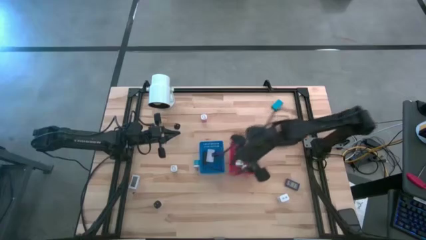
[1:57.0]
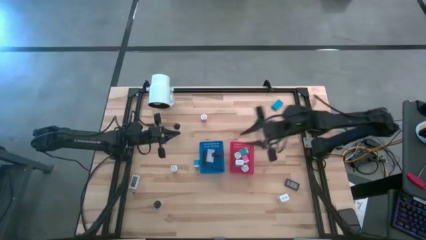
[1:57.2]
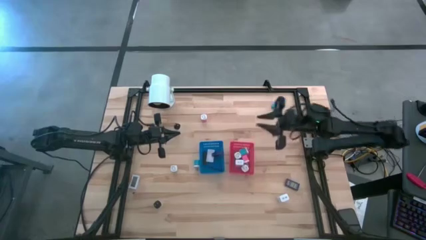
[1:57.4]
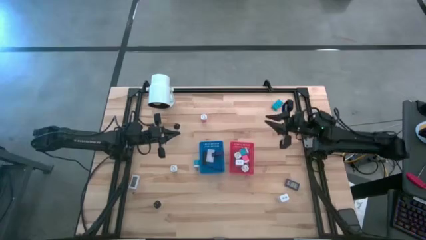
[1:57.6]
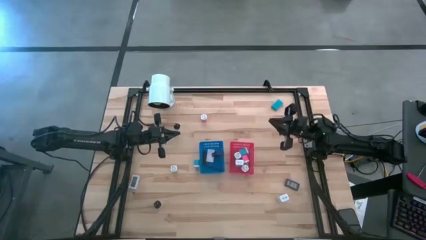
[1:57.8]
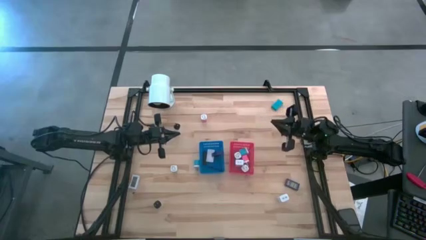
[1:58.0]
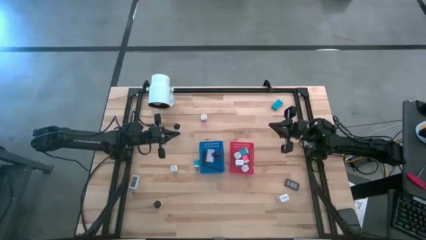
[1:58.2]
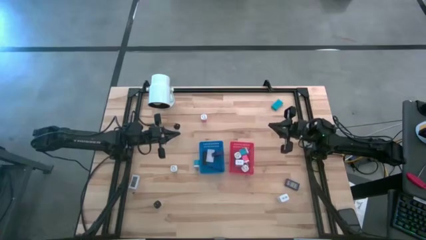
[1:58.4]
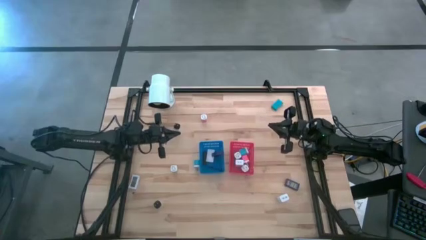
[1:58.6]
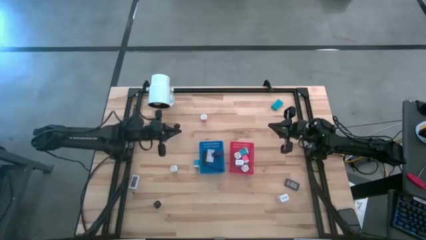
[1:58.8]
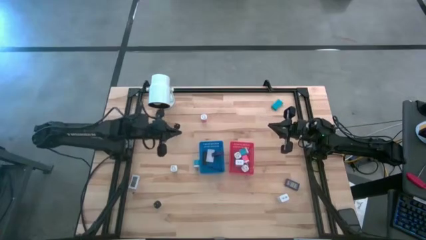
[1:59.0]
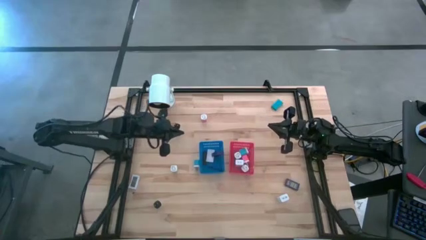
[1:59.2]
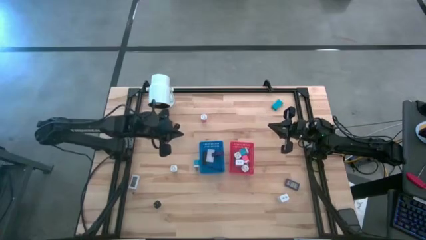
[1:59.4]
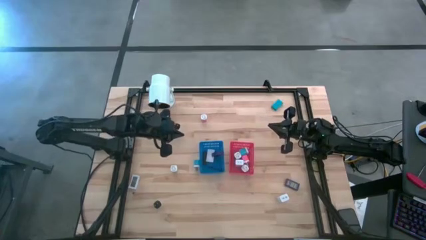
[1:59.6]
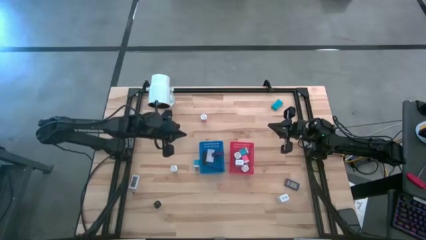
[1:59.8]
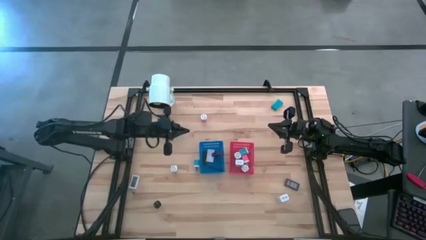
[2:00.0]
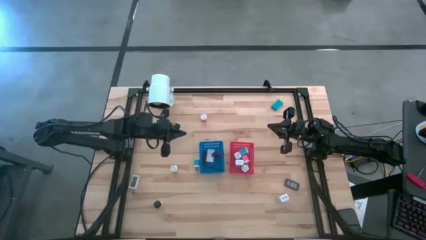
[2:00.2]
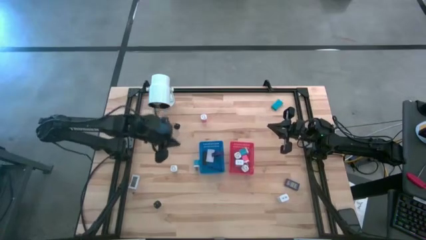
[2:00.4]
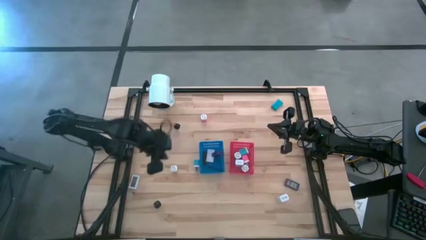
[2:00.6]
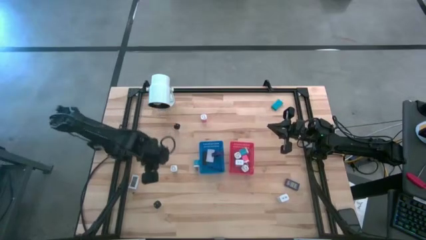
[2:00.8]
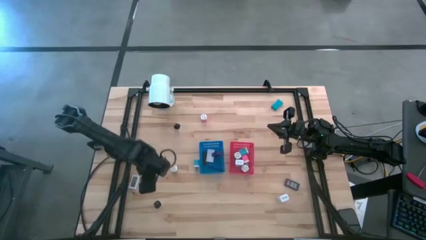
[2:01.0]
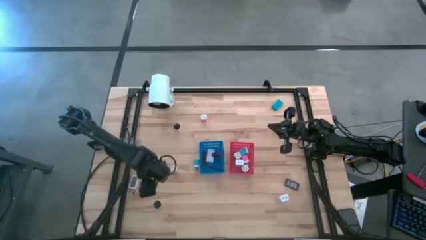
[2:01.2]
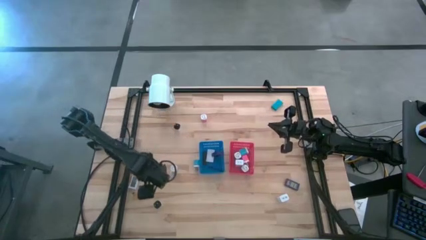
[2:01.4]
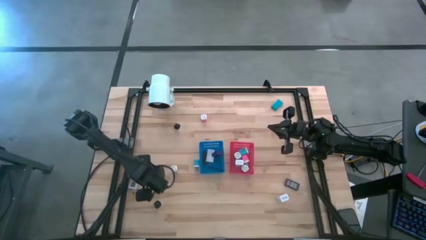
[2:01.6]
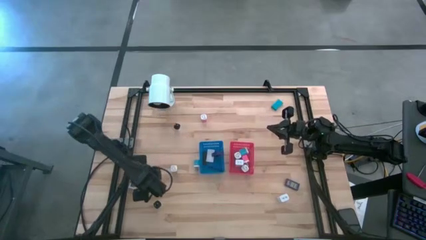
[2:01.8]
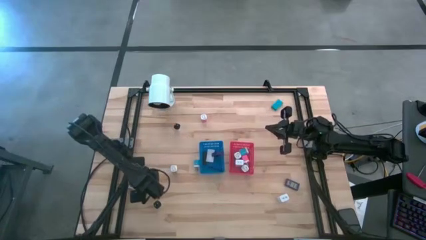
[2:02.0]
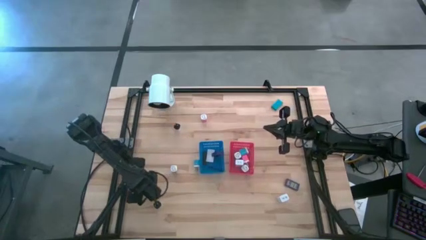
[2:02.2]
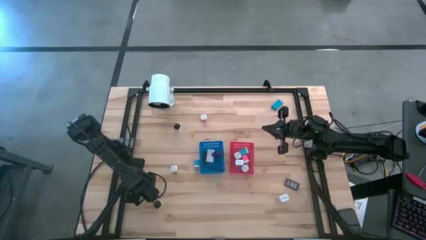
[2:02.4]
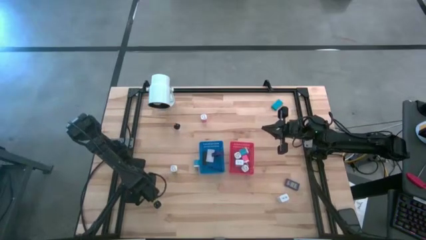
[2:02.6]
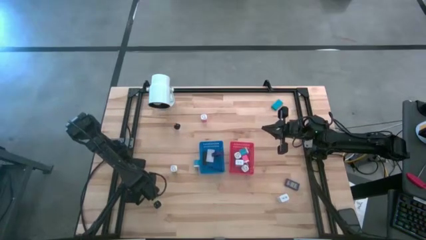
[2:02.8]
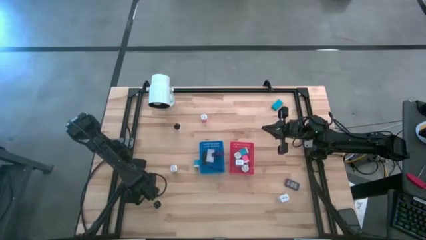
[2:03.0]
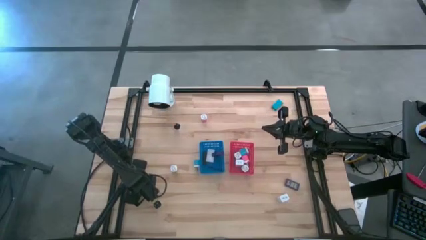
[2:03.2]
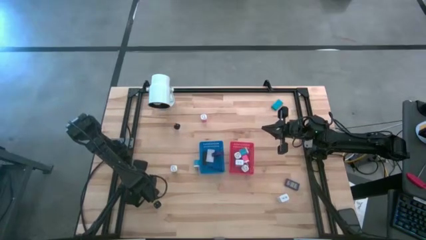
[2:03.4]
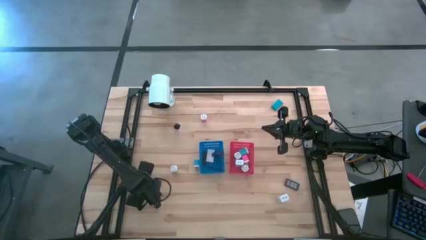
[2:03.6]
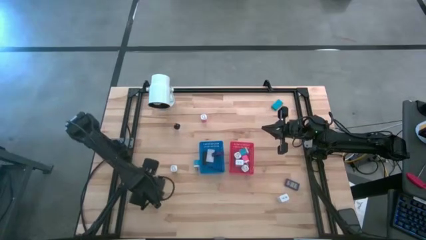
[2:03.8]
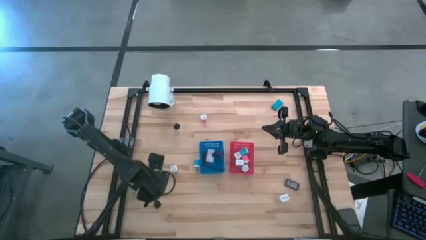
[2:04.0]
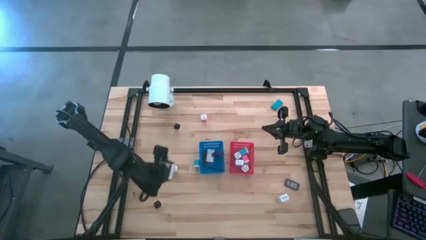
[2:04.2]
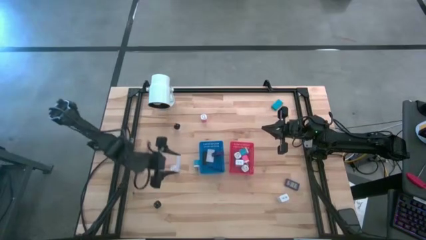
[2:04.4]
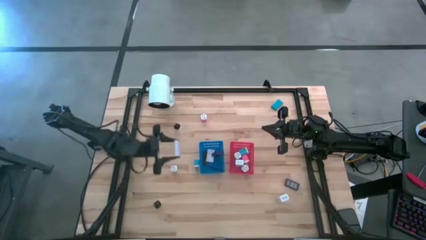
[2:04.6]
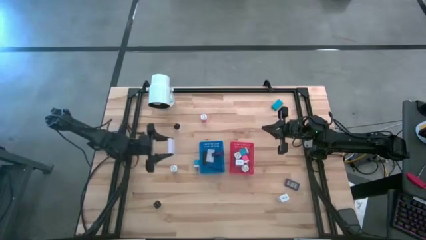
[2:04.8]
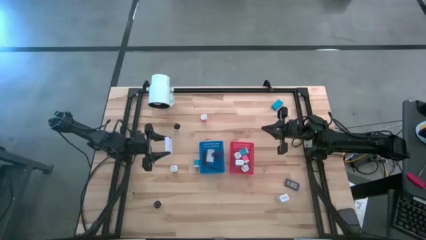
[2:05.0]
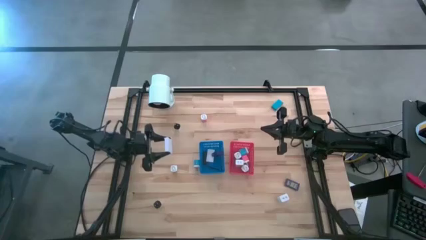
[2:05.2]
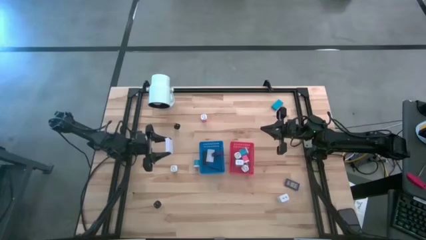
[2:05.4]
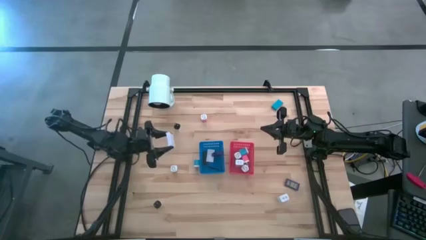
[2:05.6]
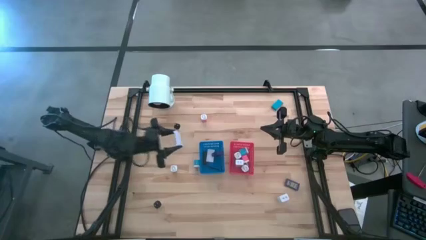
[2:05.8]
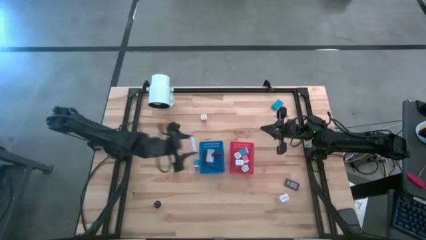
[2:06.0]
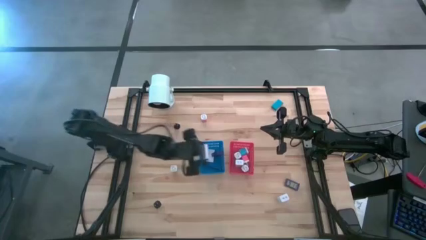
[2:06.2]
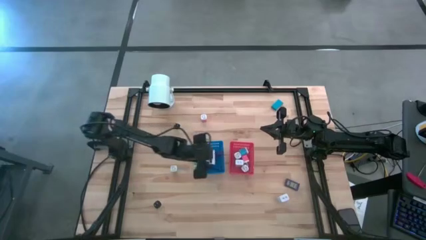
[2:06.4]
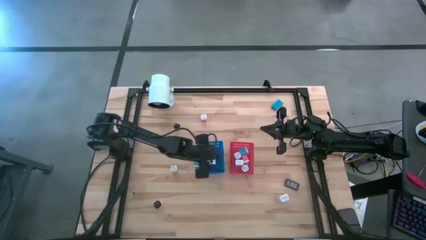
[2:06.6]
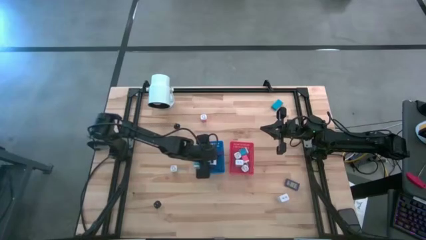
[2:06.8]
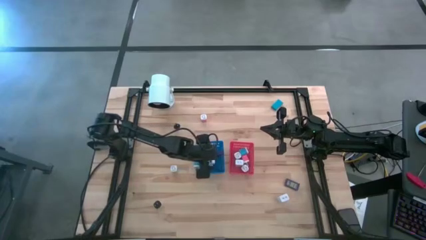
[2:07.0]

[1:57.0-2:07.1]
Task: Sort adapters and digital timers
Put the white timer into the blue bin

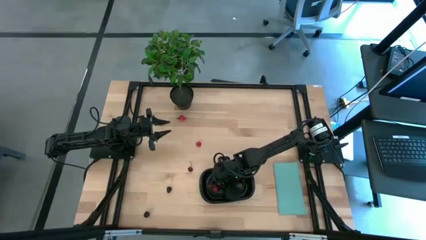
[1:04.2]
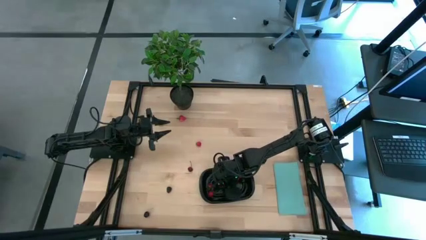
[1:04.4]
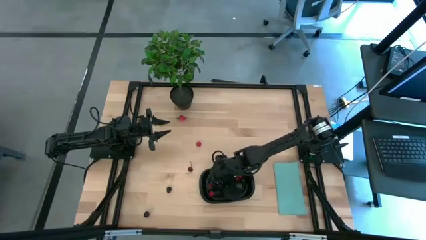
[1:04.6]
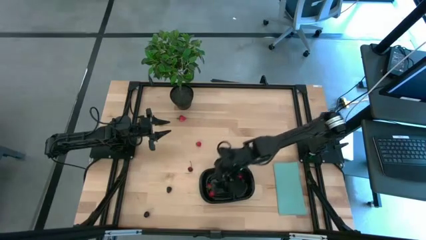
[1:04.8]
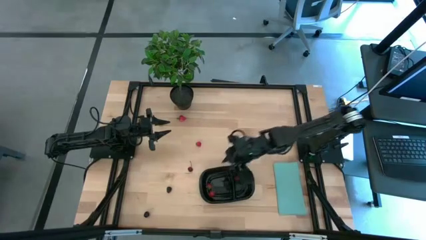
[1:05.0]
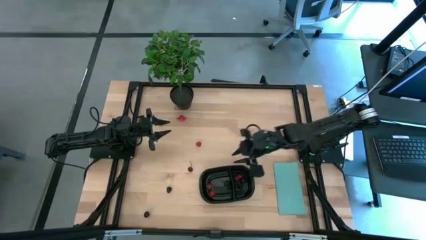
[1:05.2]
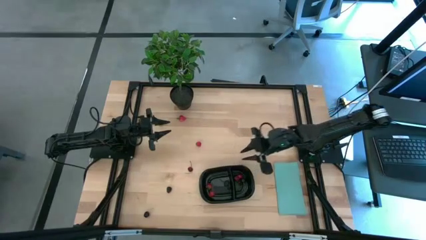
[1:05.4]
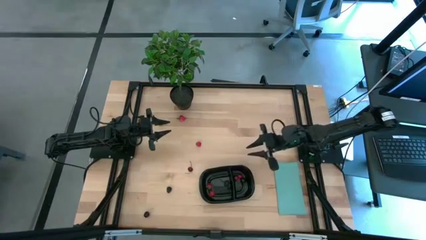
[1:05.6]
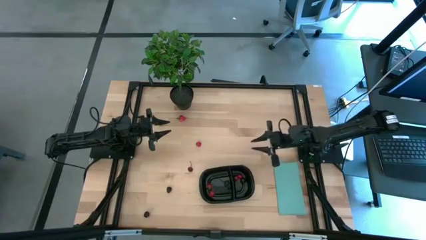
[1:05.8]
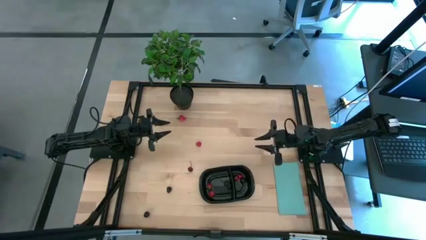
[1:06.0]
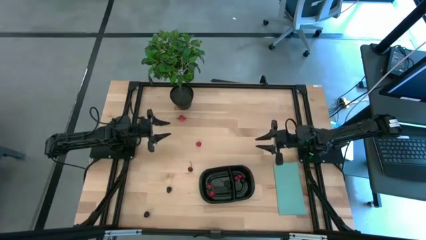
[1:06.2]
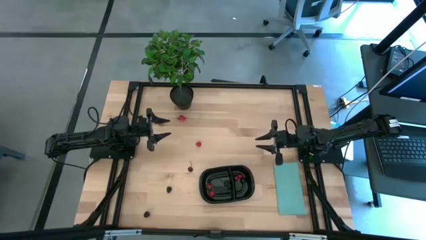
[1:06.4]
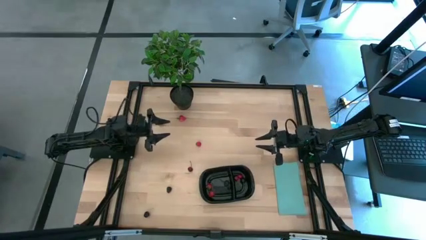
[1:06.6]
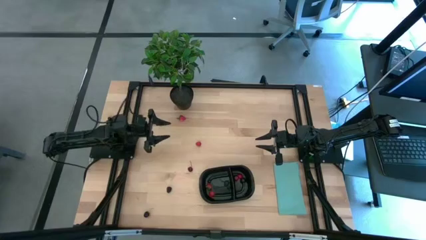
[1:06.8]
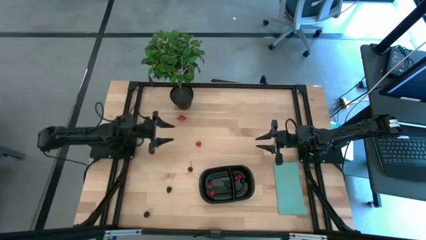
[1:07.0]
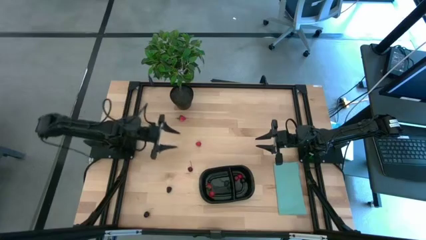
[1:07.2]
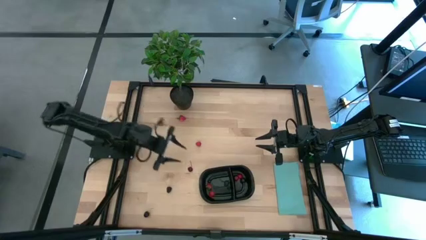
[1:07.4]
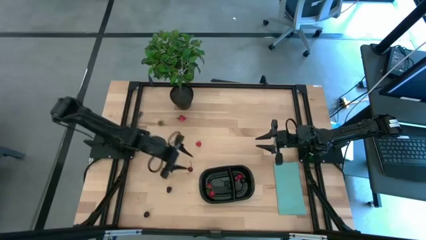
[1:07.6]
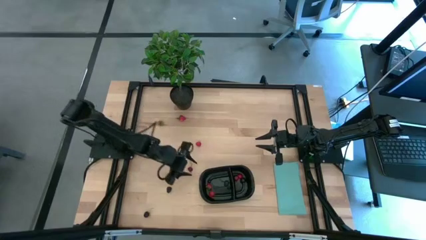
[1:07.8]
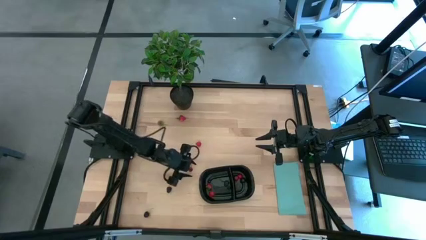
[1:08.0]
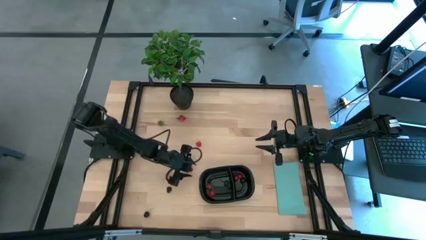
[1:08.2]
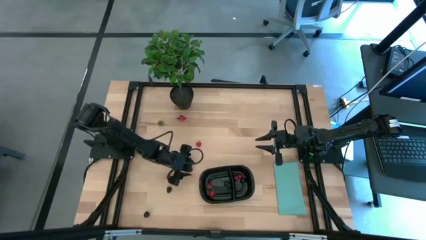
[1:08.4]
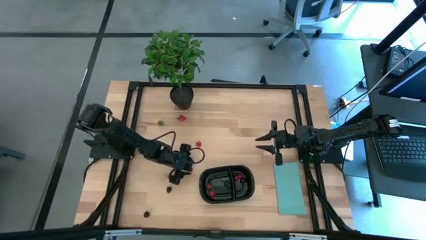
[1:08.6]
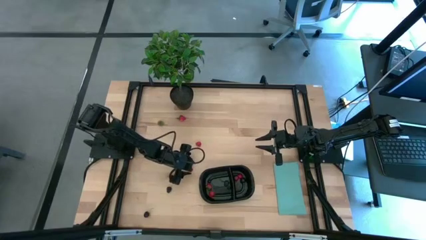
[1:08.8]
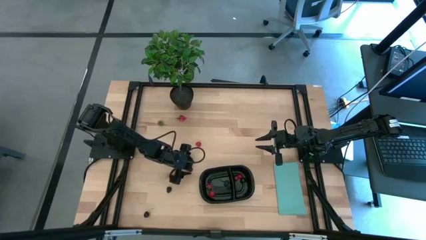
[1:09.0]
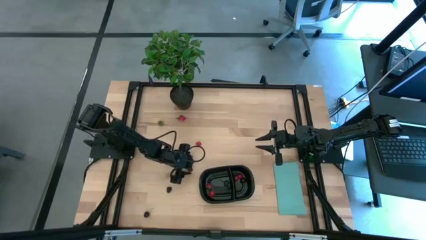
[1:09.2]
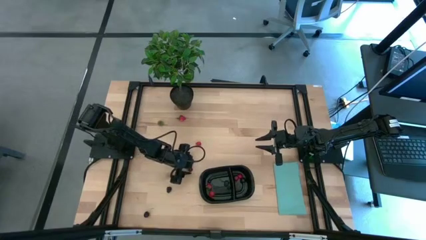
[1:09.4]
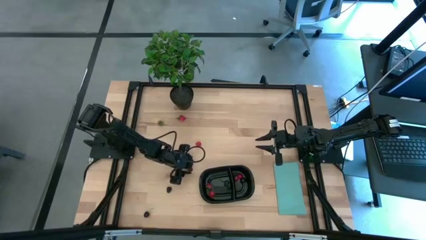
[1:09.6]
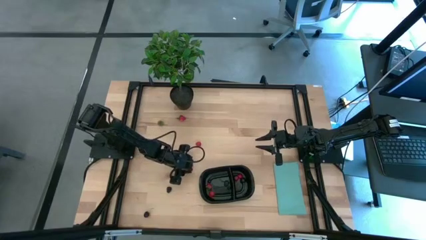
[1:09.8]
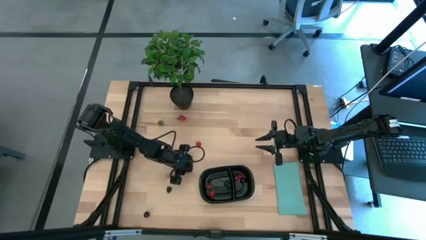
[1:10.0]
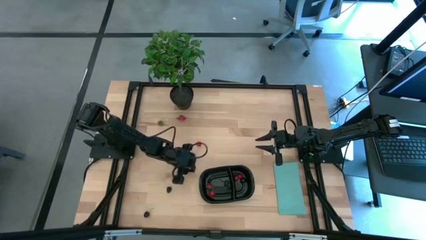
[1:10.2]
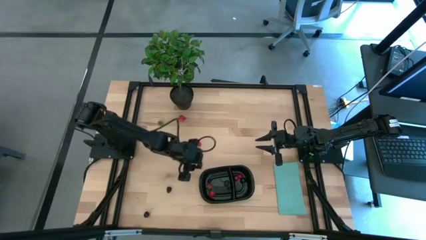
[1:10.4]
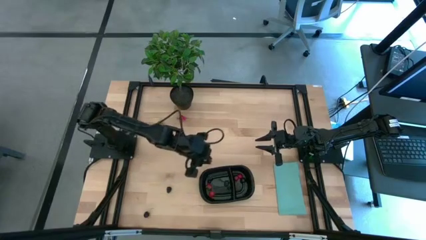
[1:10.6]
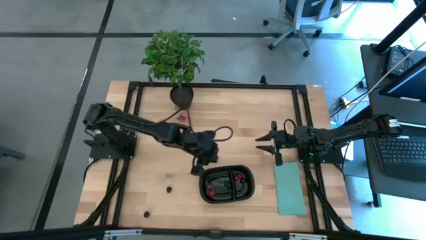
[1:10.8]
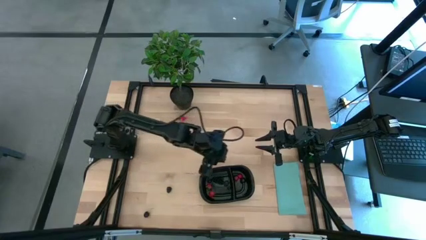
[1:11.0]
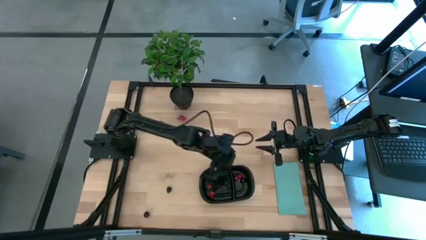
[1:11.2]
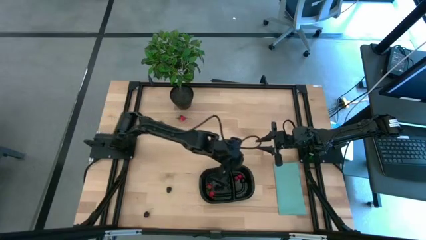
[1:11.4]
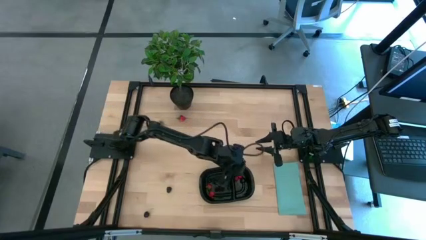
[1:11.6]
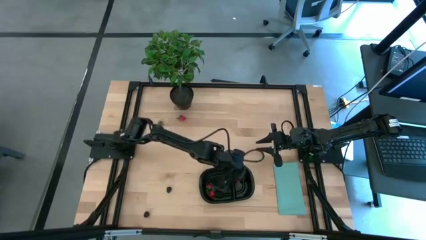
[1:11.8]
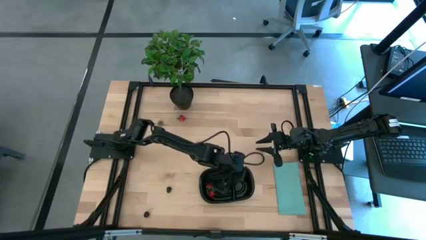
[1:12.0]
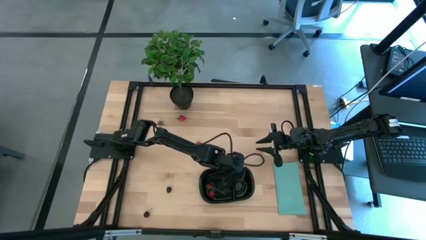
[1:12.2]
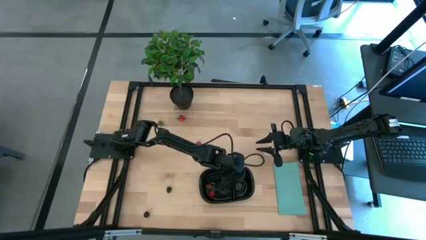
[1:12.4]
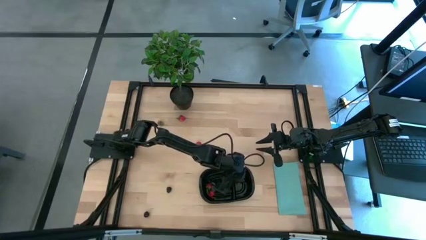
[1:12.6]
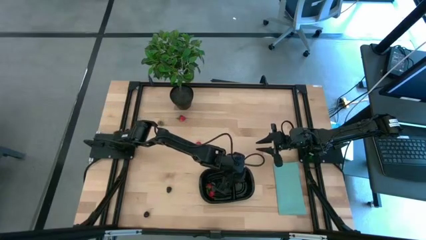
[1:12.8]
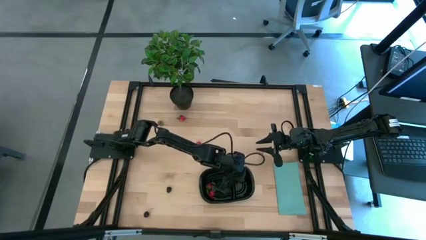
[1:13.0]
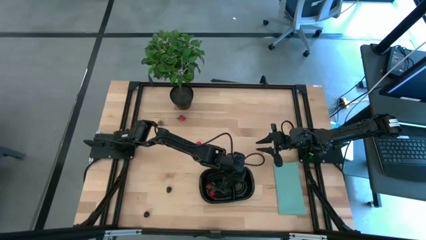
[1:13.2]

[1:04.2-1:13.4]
Task: Pick and placing Produce into tupperware
Put the red cherry into the right side of the black container
